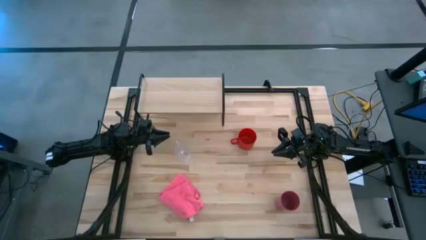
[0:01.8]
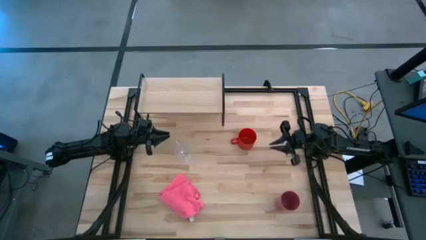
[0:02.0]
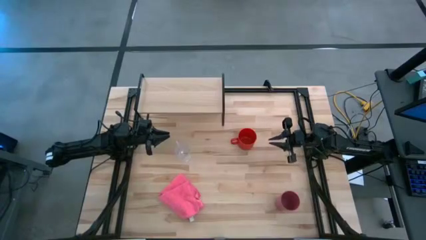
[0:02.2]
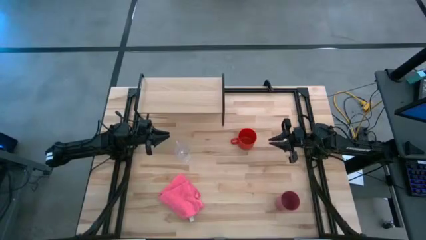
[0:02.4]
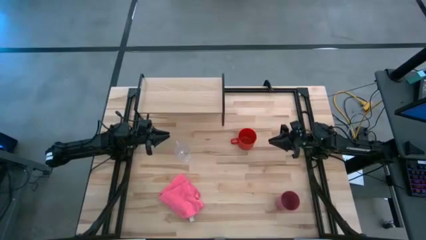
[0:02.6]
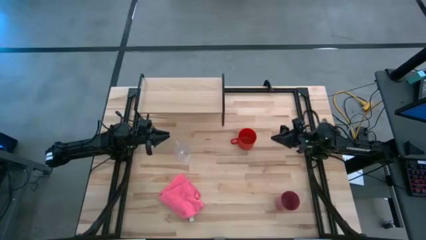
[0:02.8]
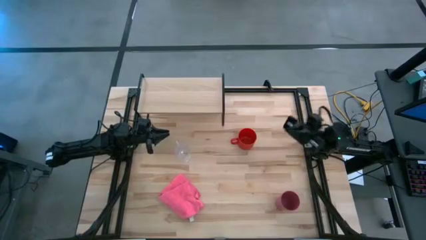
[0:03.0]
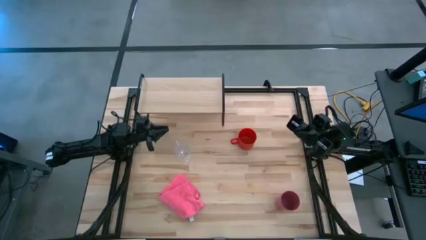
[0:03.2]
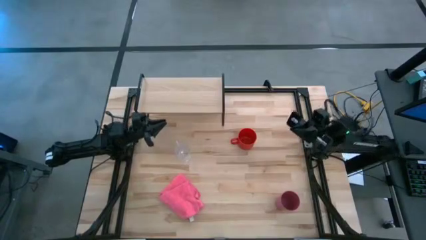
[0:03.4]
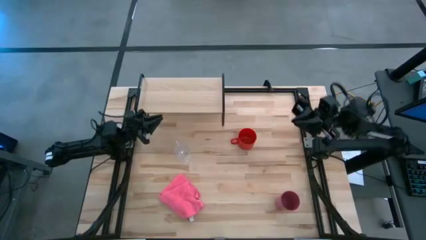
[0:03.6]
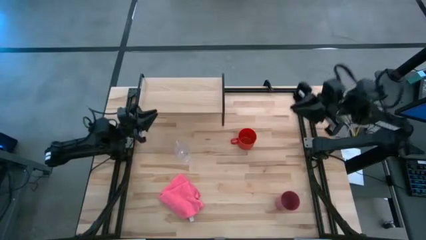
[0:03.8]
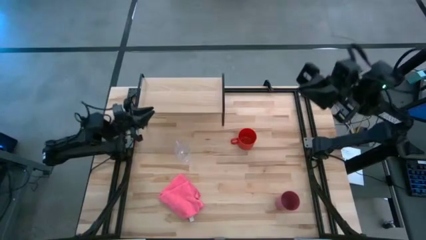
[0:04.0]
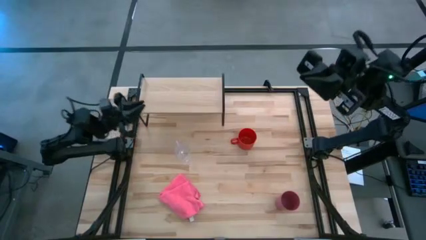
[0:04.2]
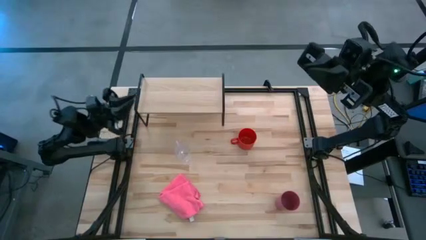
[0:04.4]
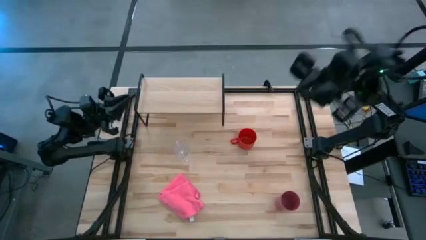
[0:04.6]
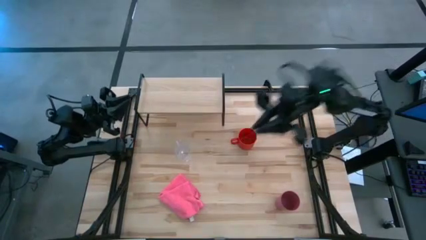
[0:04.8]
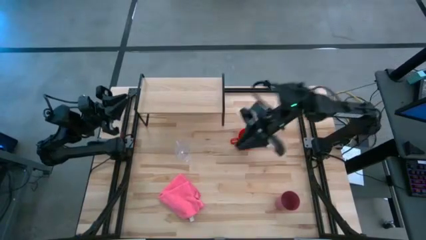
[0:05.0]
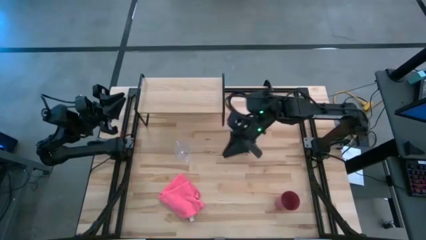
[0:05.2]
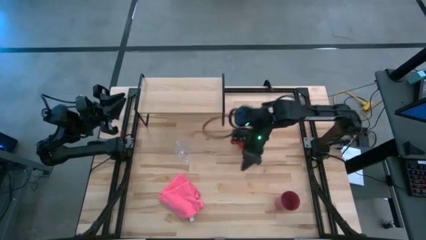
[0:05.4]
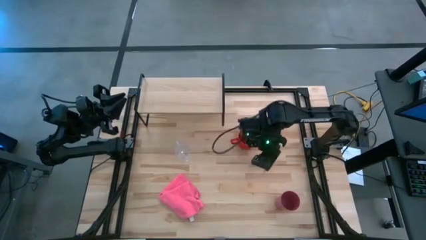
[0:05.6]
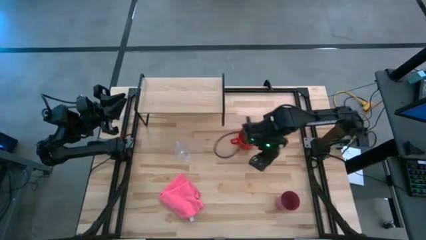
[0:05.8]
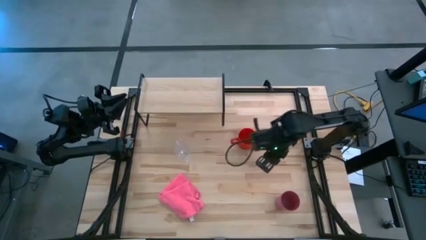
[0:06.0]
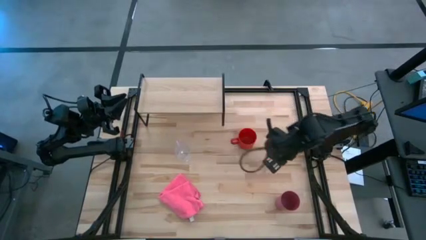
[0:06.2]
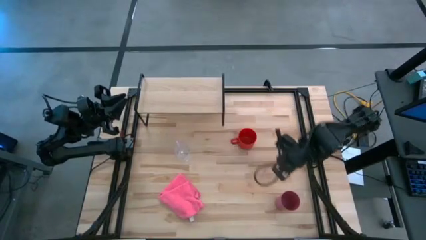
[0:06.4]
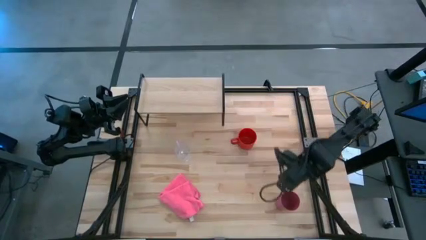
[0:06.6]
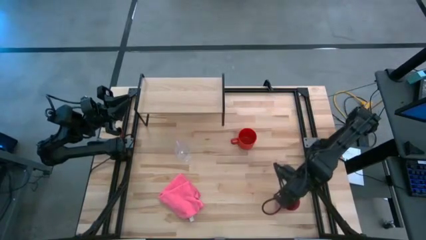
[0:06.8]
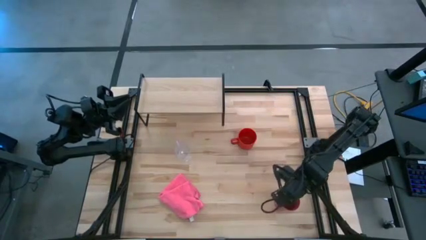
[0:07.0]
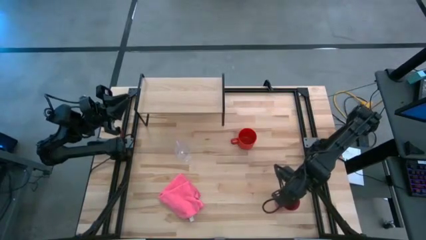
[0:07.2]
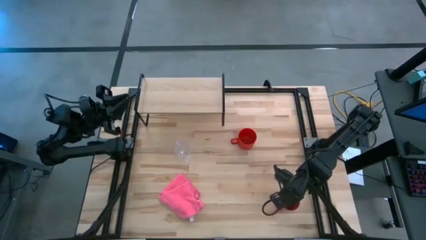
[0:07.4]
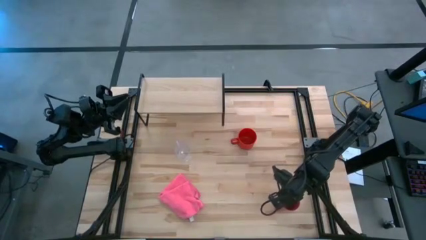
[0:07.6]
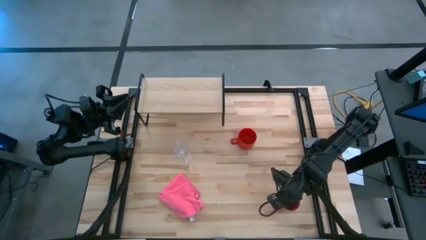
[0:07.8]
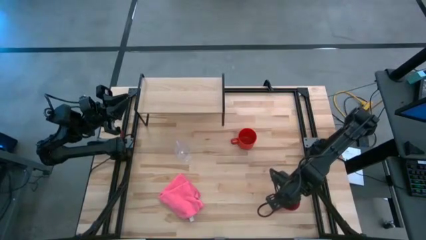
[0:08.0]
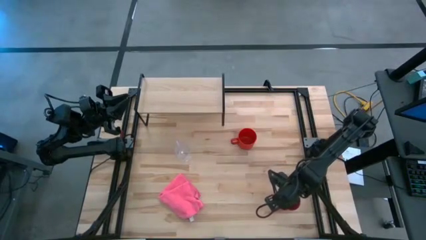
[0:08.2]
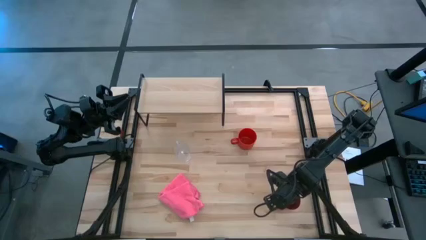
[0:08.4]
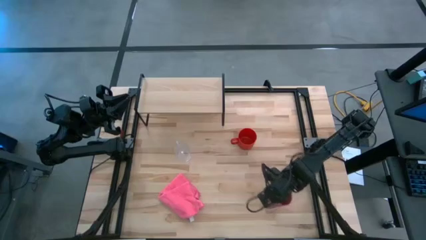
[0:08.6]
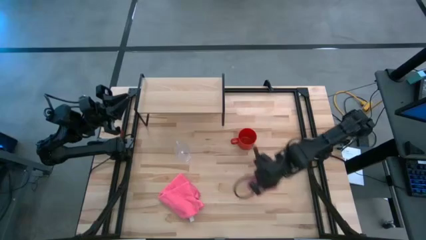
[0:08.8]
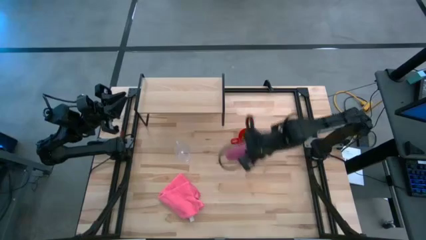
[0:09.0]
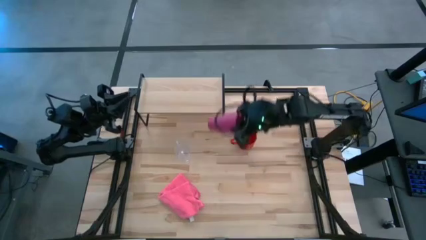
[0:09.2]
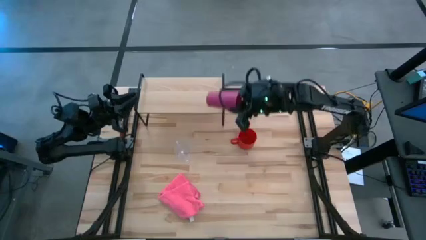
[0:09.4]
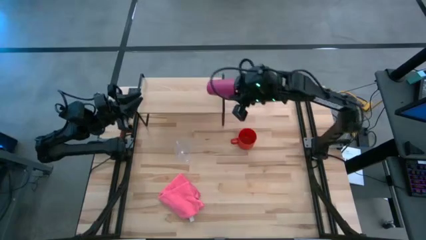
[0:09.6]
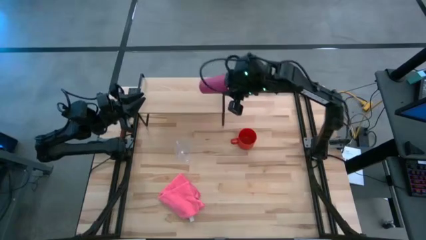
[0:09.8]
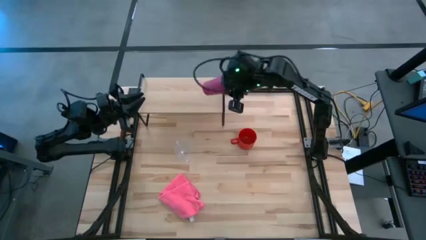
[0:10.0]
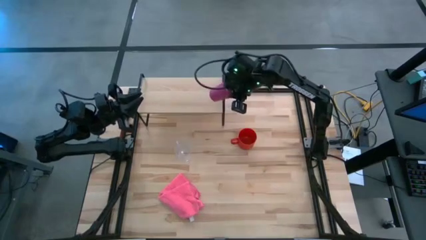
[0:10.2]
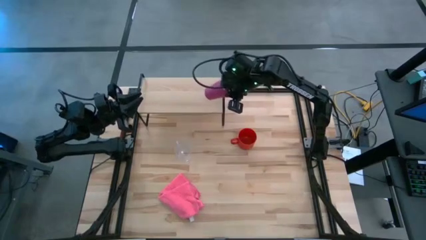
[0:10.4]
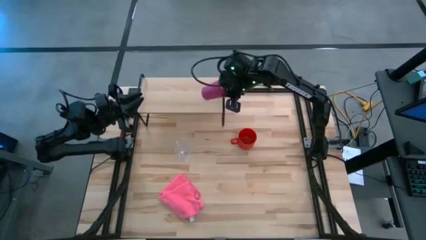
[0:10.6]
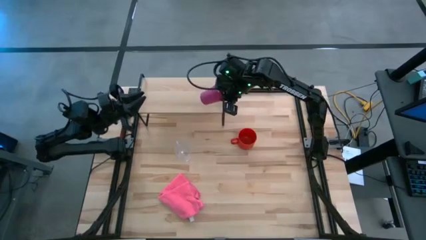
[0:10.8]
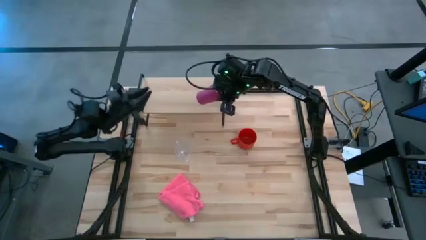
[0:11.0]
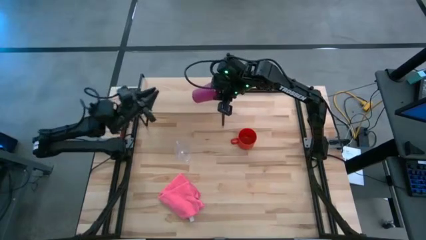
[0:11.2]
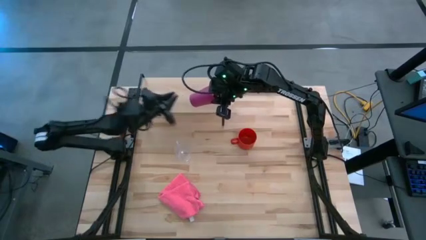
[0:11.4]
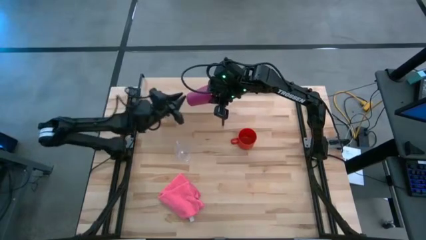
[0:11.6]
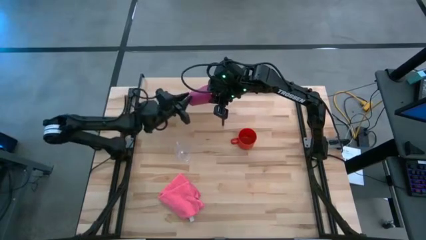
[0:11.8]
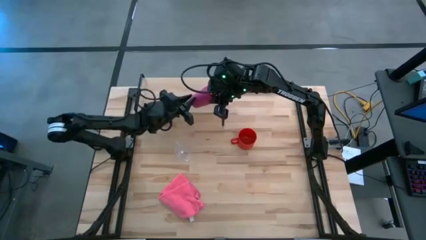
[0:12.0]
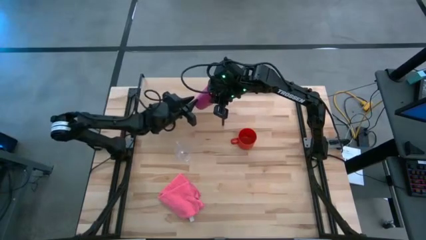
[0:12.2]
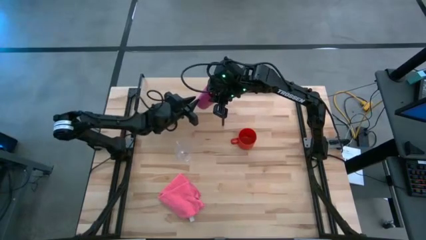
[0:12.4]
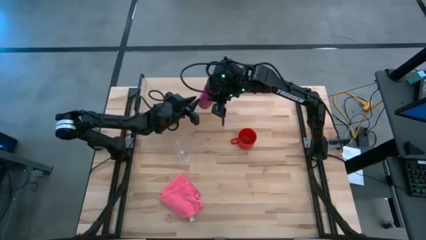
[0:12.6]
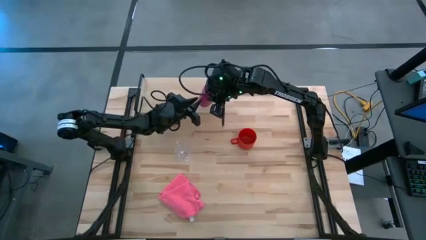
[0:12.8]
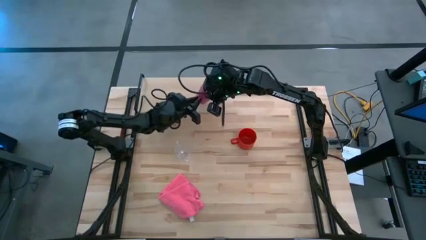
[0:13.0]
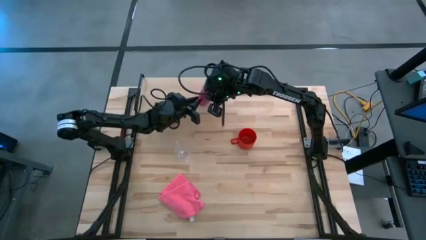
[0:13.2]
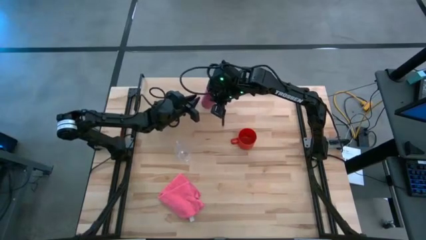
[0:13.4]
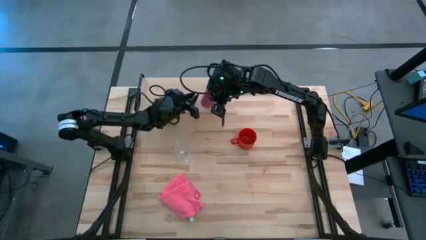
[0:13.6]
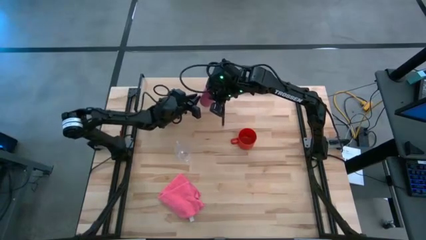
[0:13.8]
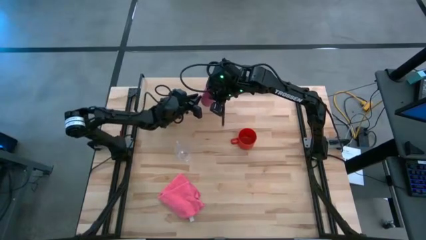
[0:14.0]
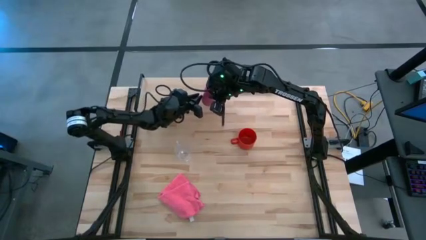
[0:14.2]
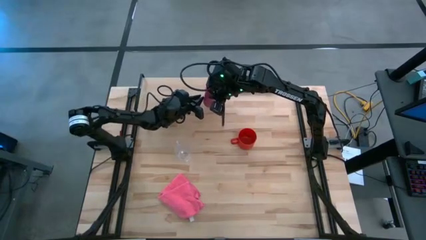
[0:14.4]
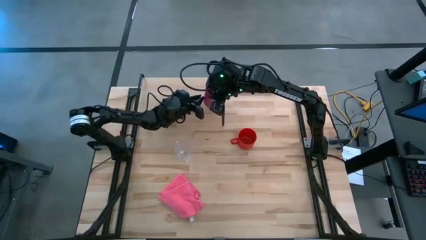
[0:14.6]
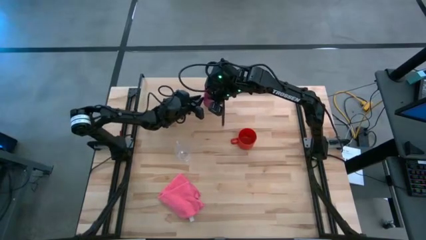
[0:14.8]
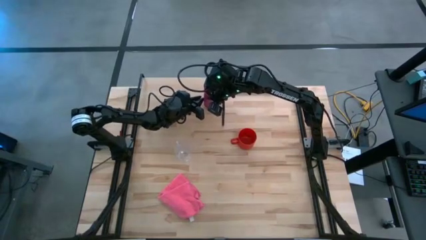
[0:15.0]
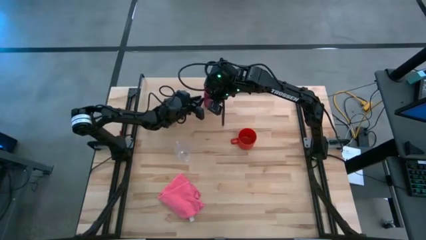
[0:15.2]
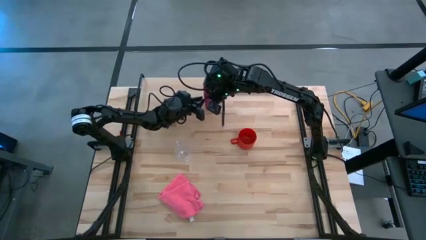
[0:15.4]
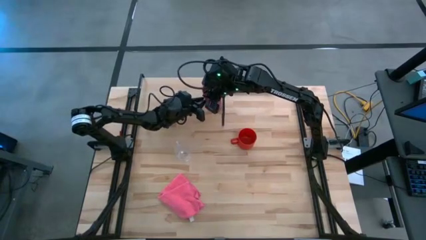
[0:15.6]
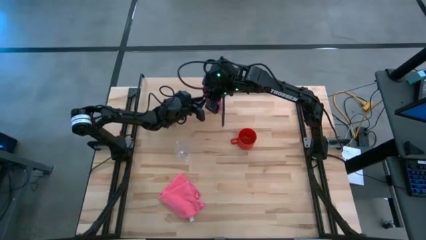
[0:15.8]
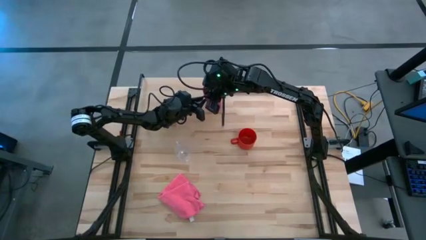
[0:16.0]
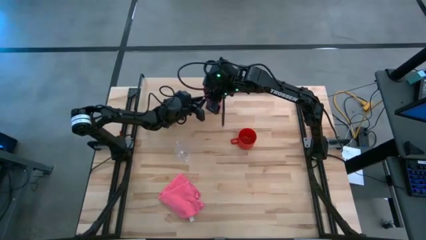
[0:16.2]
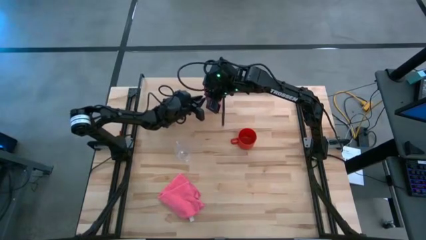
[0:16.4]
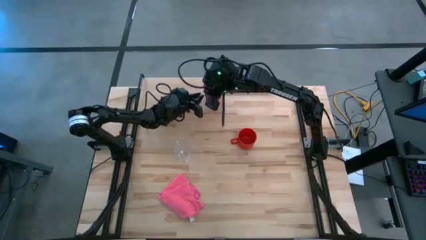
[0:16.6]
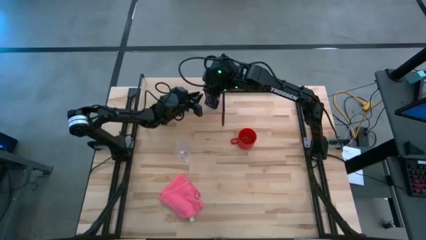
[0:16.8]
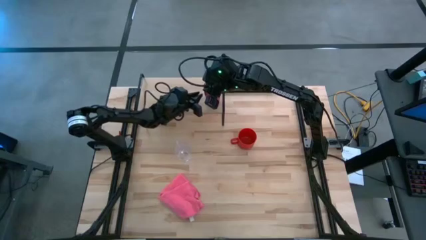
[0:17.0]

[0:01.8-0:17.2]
Task: Stack small to large cups/mugs on shelf
Put the pink cup on the shelf

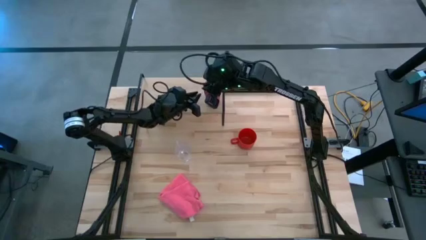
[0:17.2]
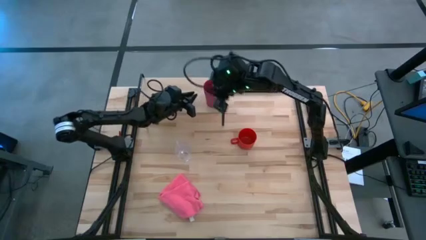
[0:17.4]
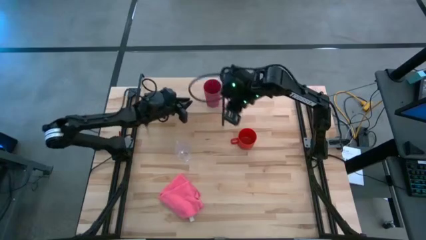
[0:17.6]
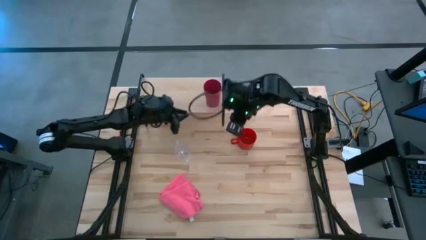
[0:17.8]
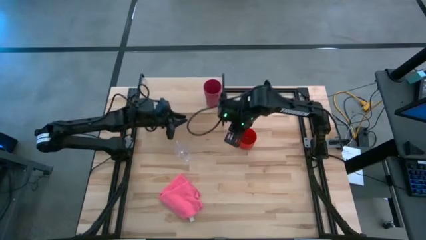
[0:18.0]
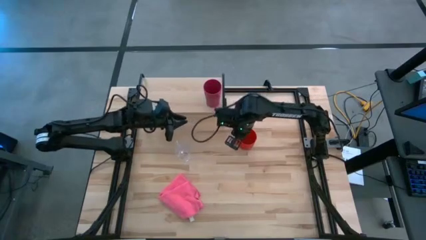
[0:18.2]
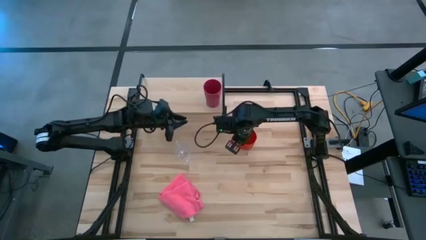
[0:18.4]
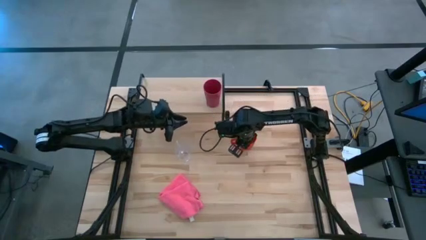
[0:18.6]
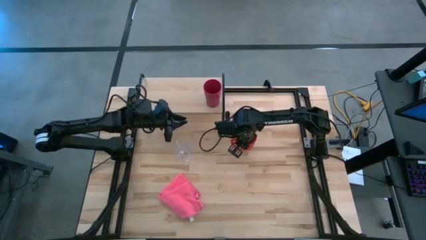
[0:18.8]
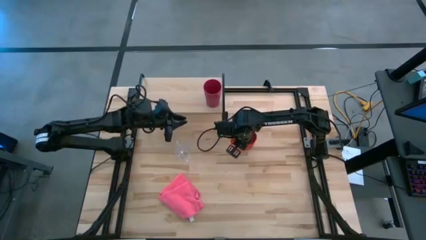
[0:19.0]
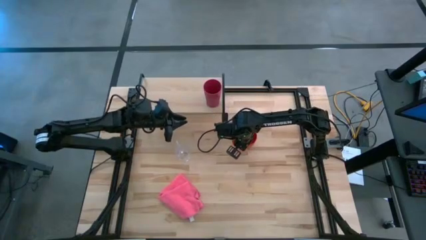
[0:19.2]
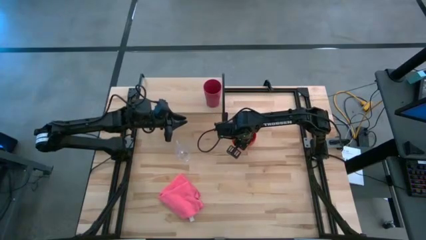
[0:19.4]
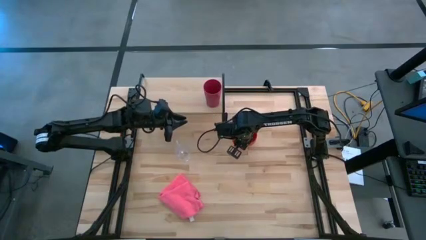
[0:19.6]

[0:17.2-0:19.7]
Put the orange mug on the shelf
